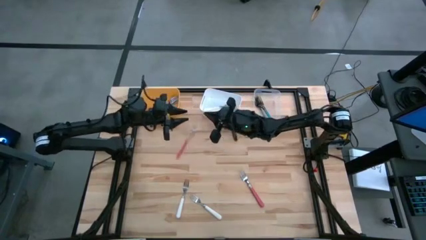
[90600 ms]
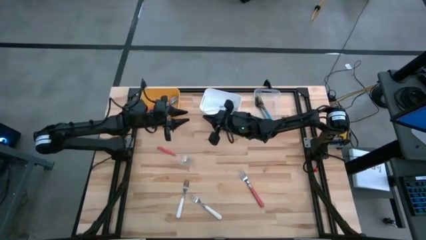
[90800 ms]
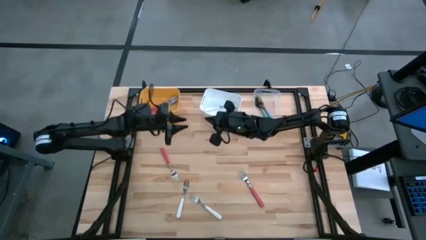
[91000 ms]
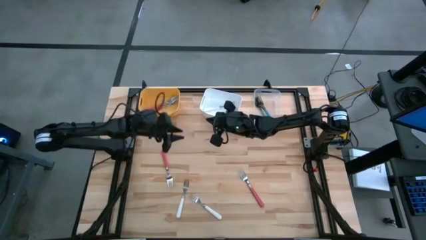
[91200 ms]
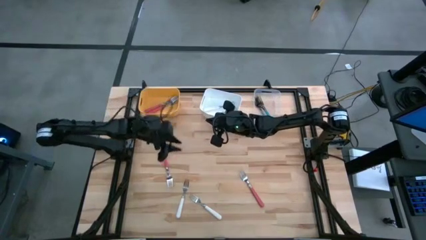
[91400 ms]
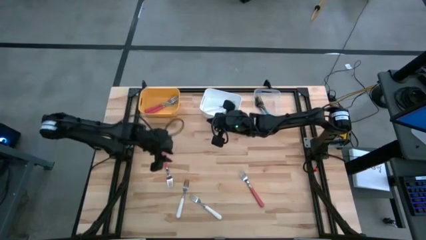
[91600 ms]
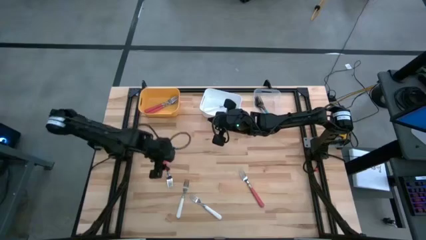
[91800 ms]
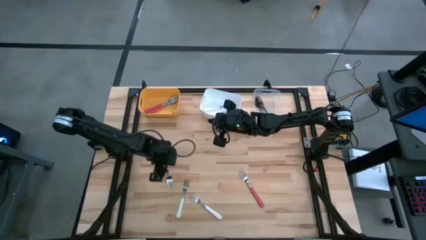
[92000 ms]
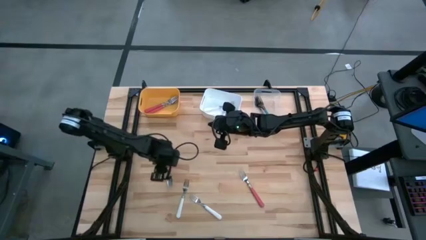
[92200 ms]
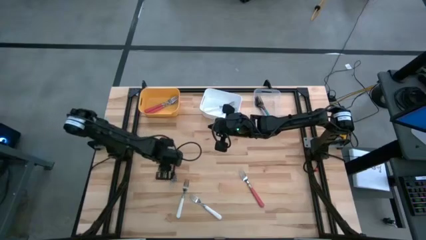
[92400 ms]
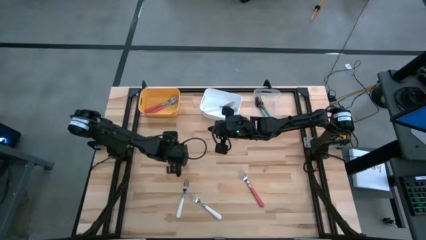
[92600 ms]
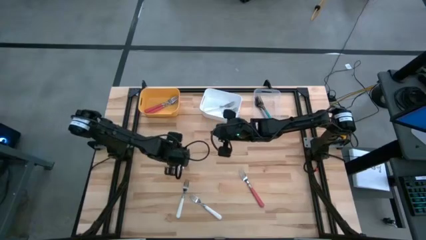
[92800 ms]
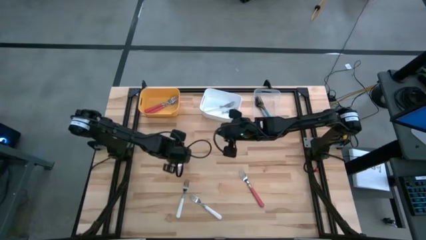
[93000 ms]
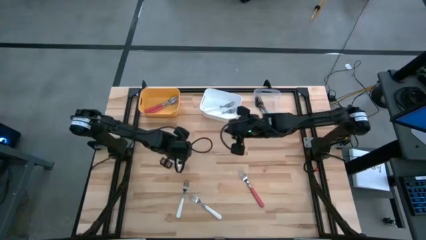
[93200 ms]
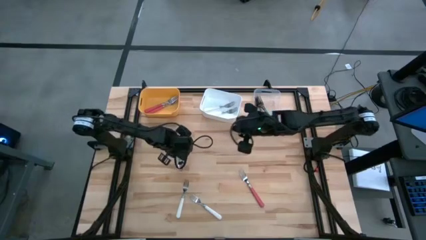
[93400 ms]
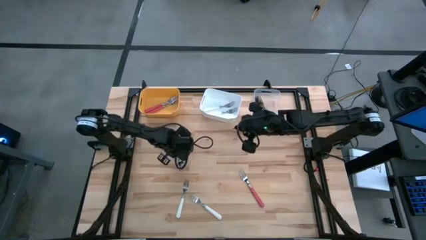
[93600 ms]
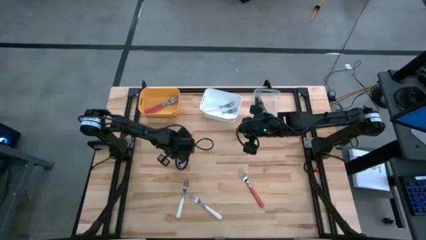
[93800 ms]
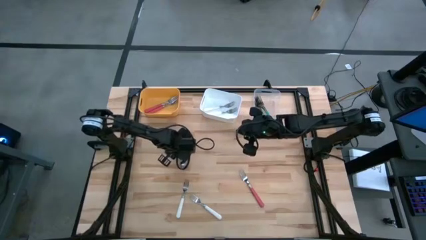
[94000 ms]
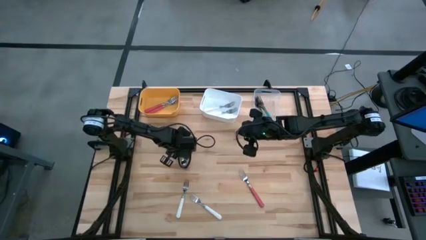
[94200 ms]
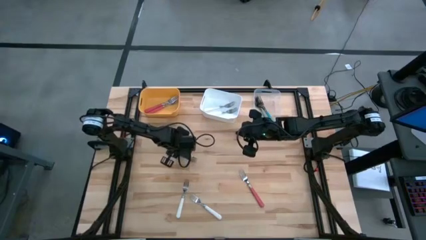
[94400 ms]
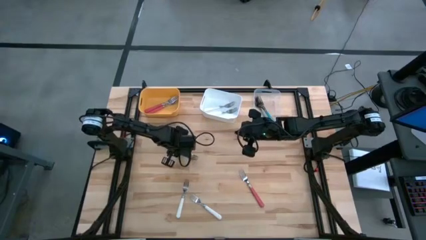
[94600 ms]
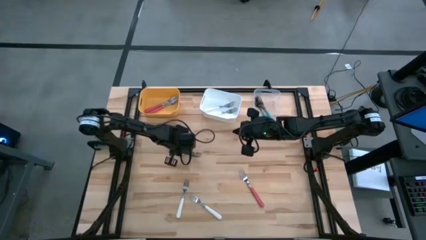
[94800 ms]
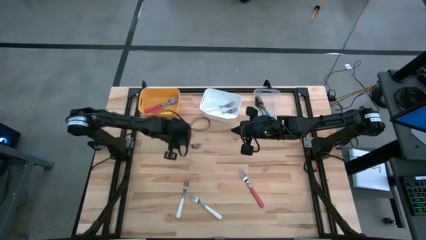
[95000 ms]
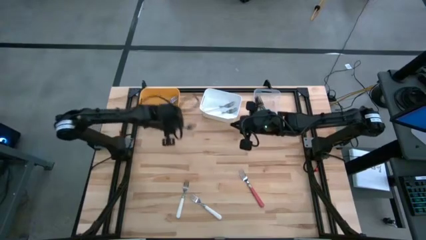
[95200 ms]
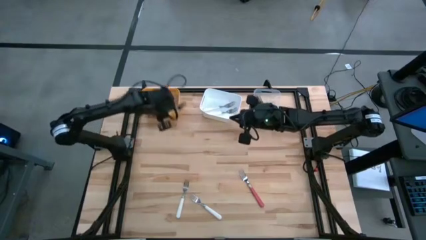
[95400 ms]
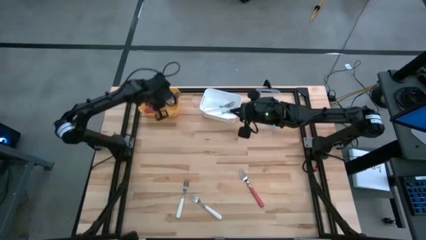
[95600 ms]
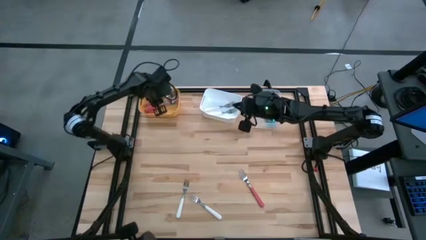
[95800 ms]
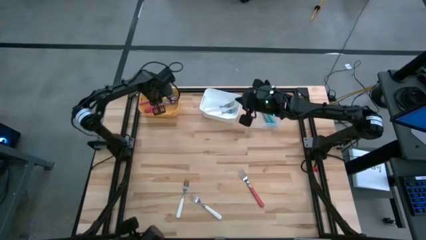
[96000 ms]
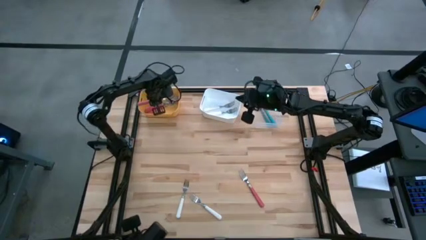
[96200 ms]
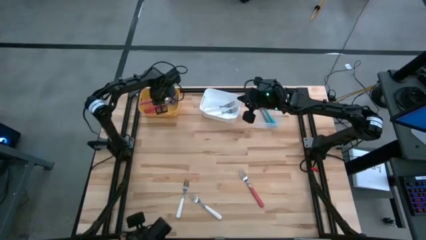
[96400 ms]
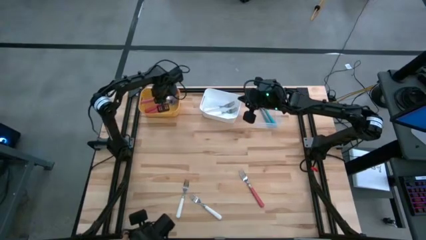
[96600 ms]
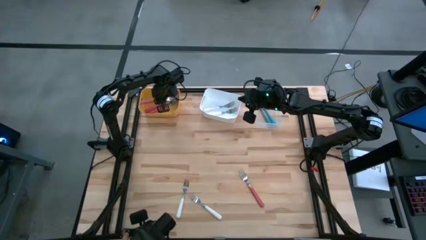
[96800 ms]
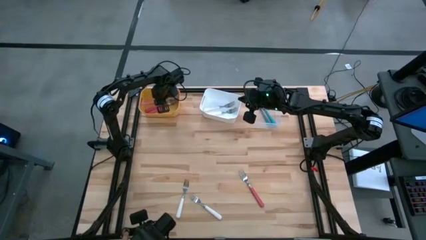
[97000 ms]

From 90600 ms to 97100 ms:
Task: Sort silverware by color (type)
Put the pink fork into the yellow bin

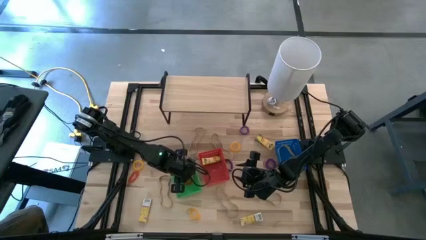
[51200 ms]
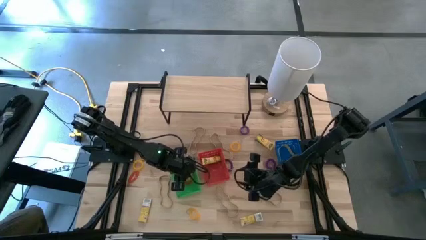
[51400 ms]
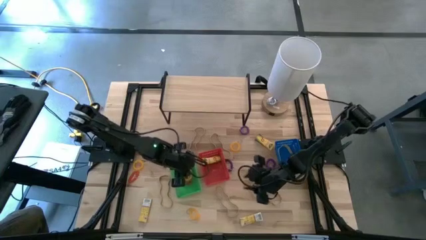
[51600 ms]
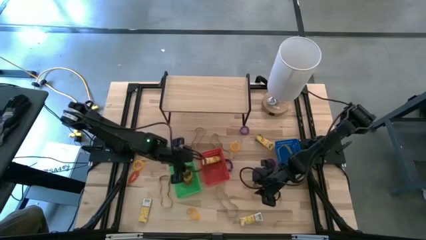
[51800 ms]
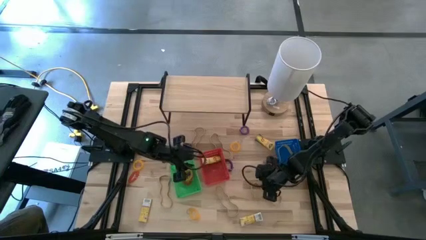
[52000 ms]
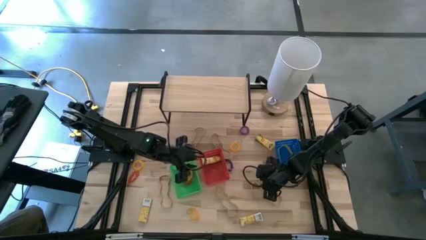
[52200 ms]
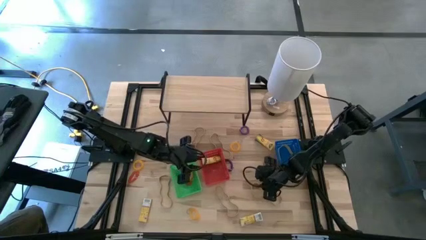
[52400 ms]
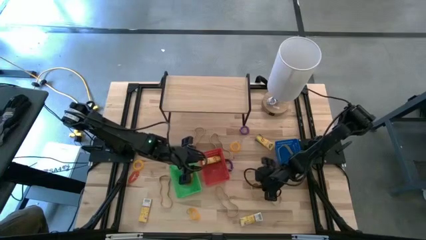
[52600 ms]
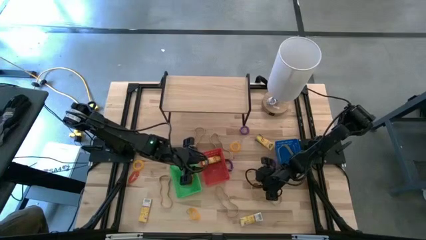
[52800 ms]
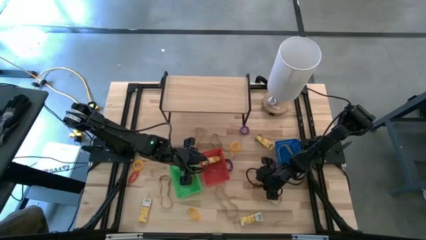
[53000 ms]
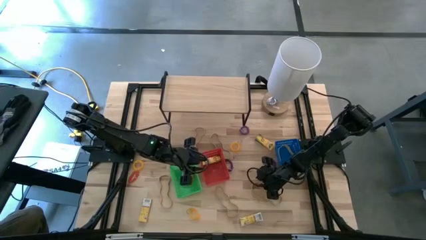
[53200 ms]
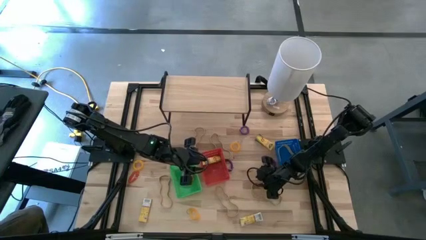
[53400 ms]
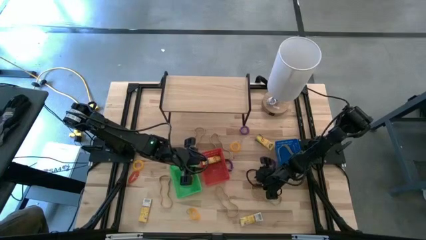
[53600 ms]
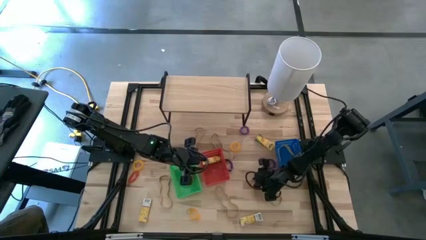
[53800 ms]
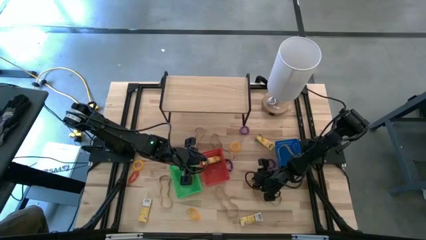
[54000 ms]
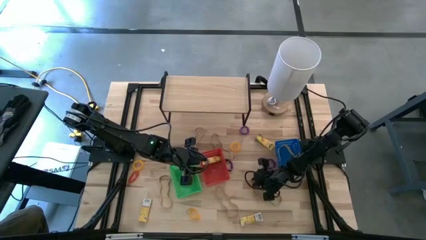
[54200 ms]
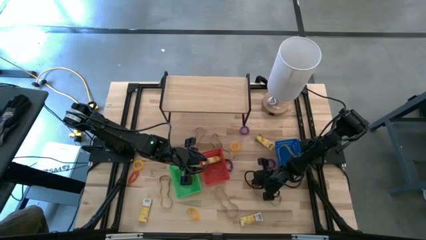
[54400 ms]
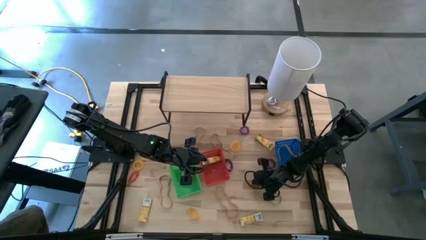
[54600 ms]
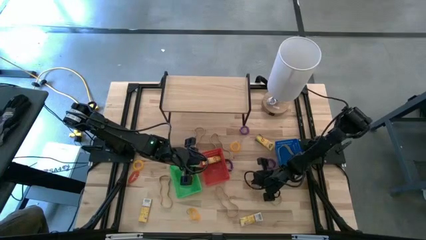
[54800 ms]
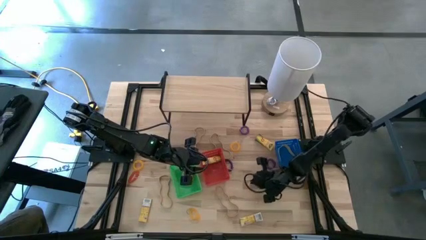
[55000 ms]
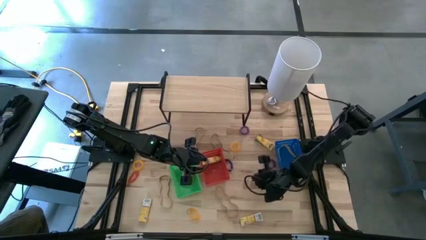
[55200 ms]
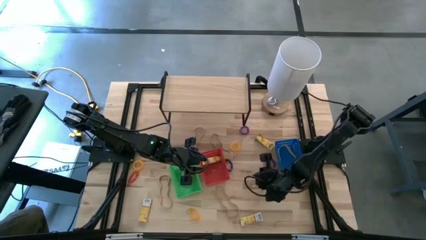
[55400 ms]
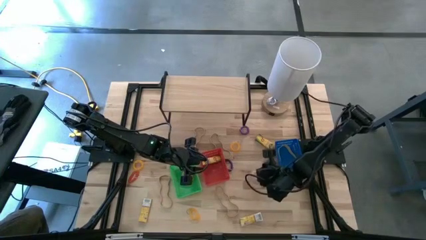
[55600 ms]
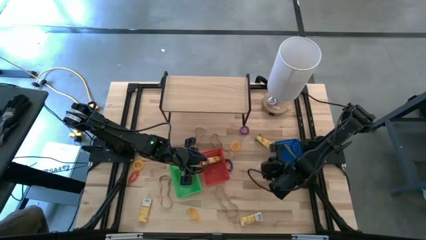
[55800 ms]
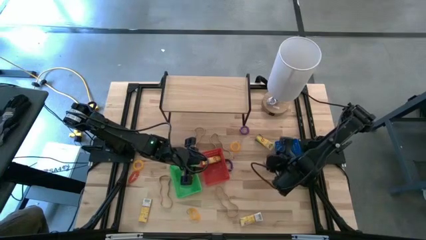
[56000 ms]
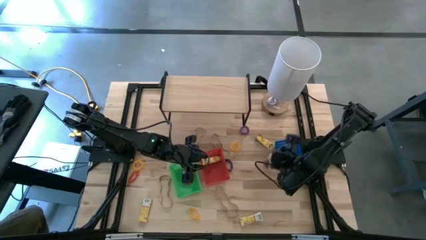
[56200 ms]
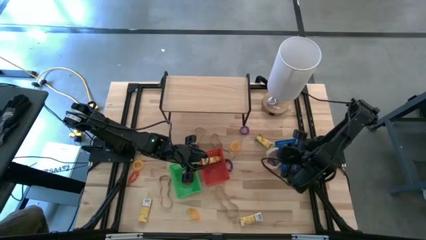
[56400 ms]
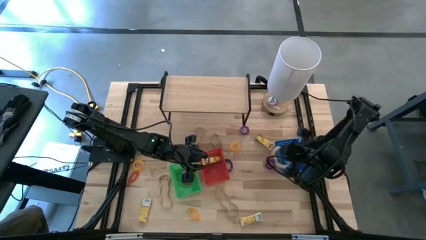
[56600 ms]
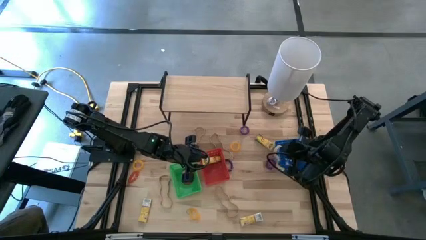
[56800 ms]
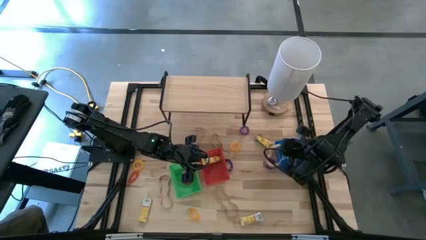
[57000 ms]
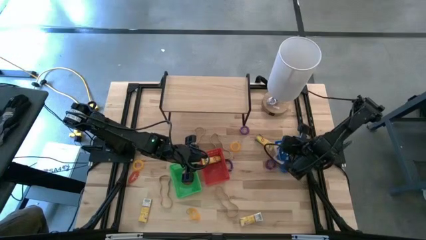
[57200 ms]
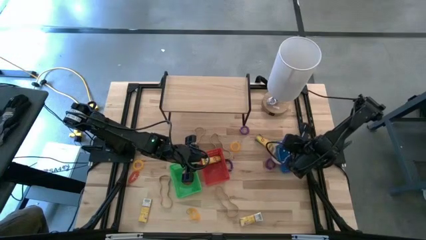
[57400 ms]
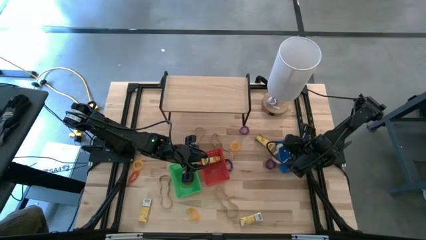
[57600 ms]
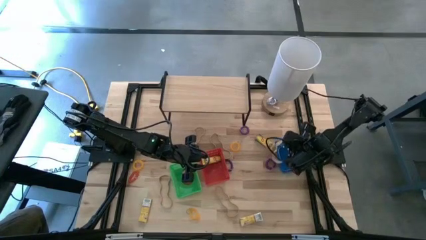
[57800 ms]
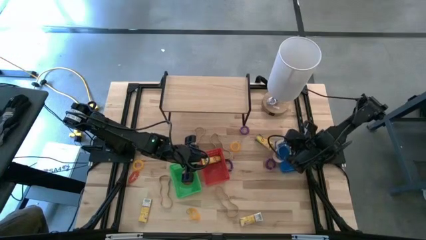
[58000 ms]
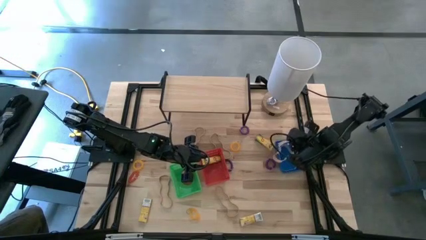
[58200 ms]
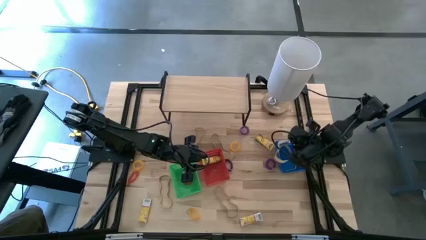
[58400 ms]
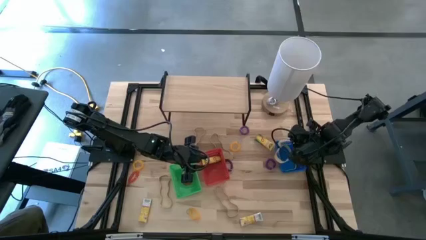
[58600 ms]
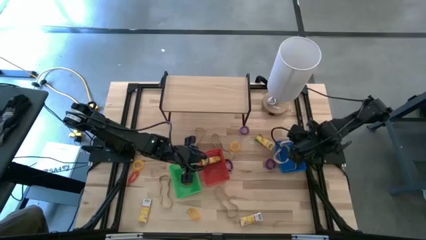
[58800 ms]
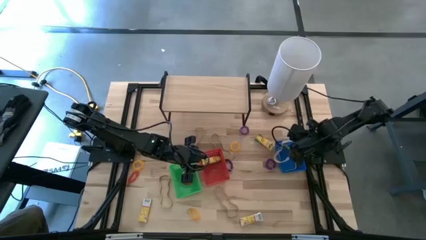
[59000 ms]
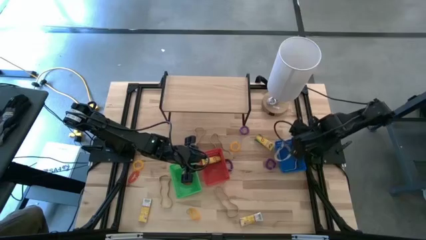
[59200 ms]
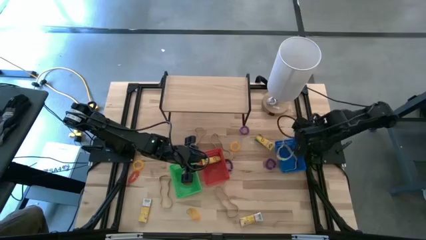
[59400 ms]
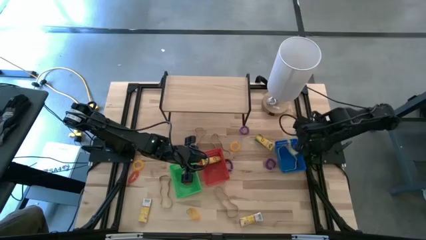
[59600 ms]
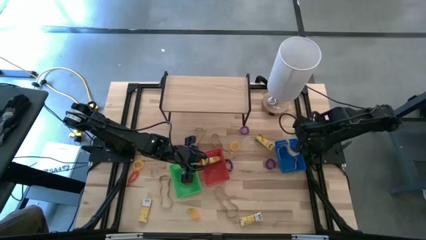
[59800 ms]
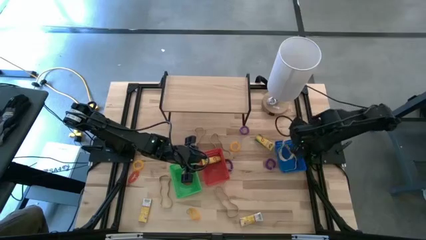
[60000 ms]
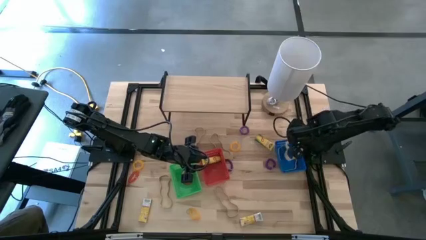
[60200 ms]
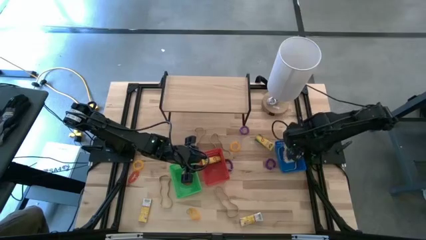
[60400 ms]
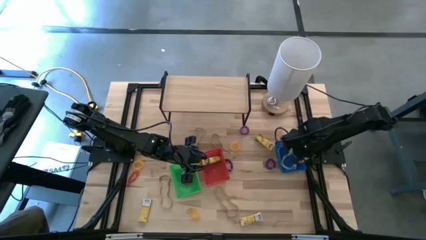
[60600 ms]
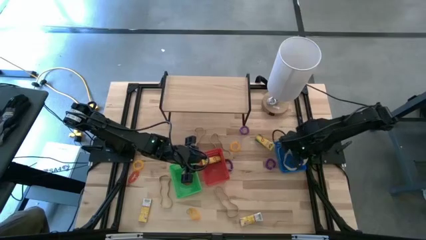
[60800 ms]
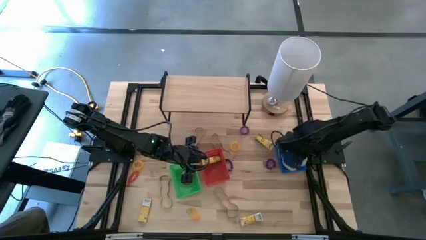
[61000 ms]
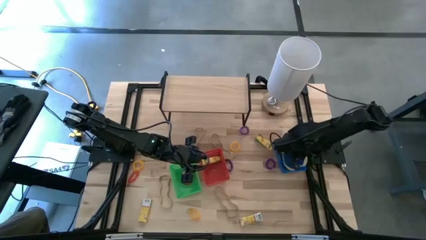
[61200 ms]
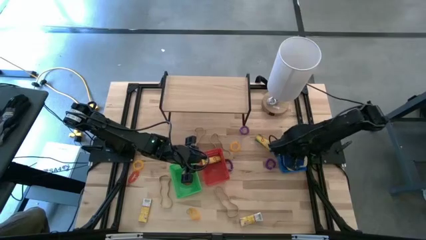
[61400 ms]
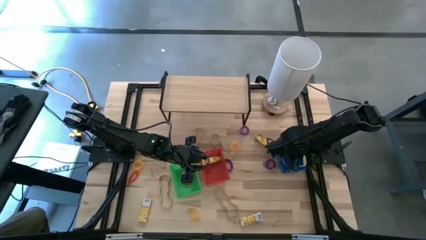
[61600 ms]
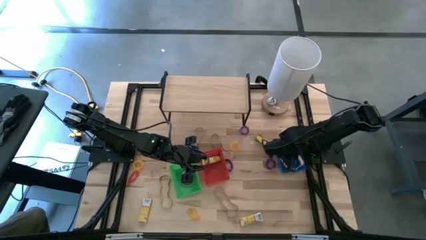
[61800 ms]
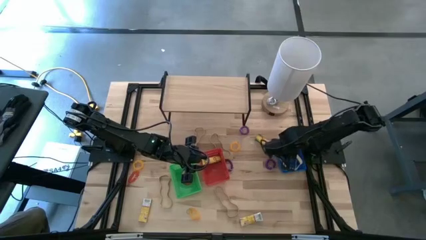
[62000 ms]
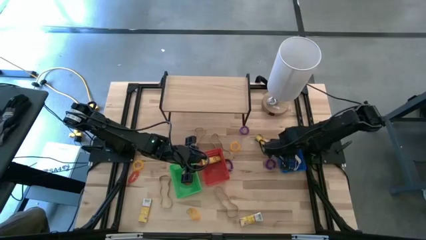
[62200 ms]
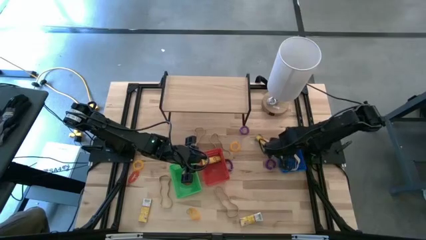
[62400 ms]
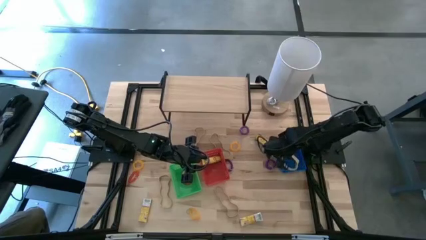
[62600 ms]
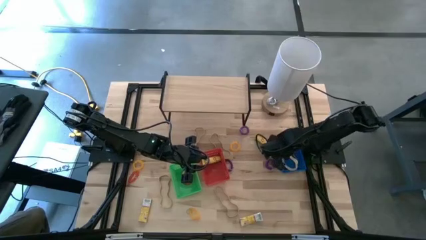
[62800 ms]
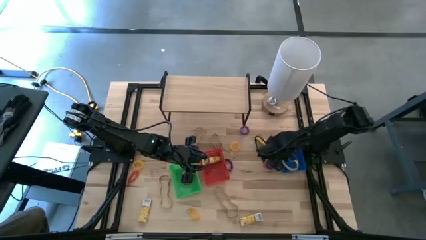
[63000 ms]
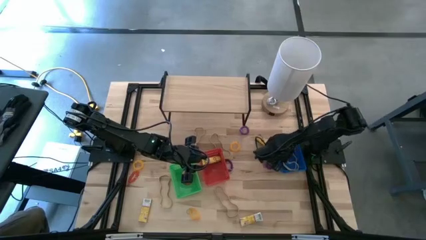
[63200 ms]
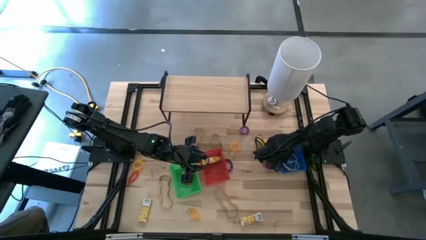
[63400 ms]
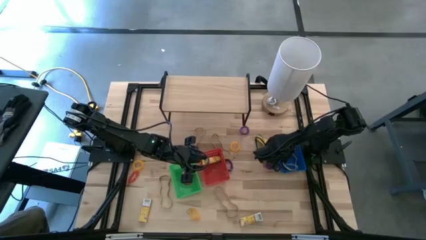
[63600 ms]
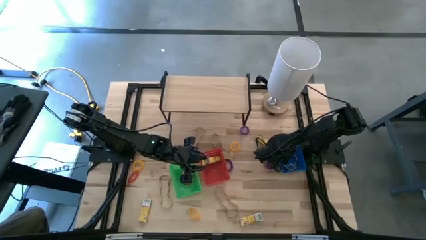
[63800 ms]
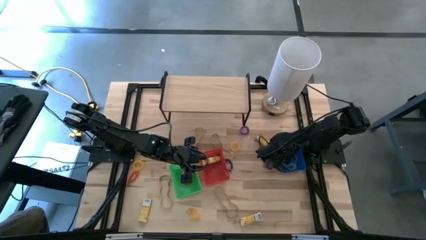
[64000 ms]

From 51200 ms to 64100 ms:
Task: Pick & Place Office Desk Supplies
Put the white rubber band into the blue bin
